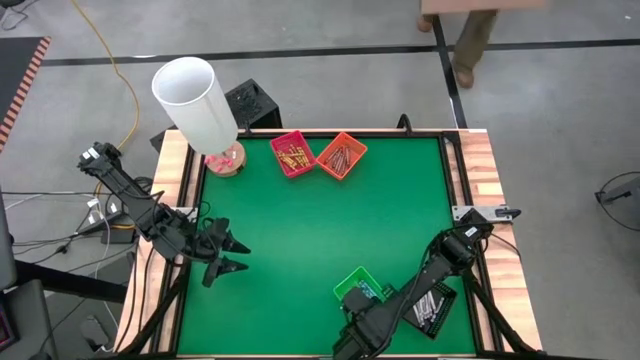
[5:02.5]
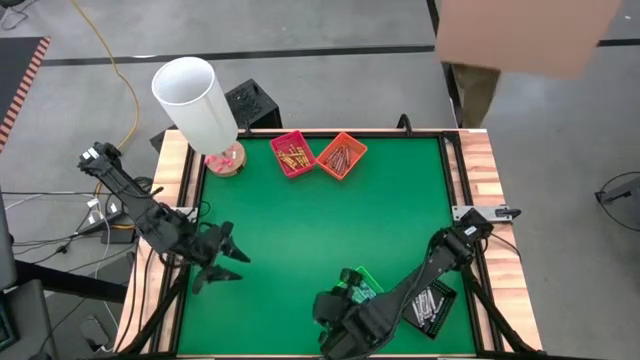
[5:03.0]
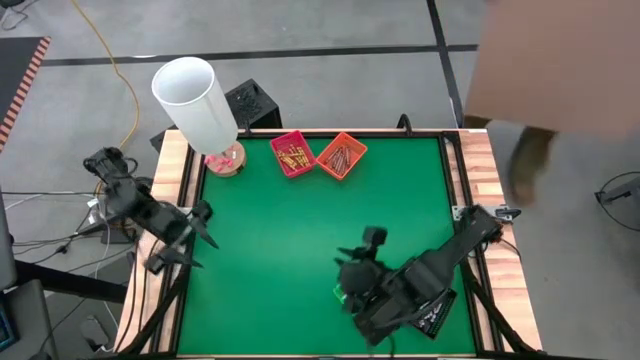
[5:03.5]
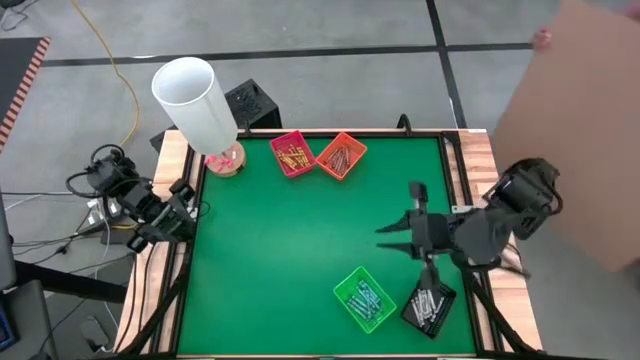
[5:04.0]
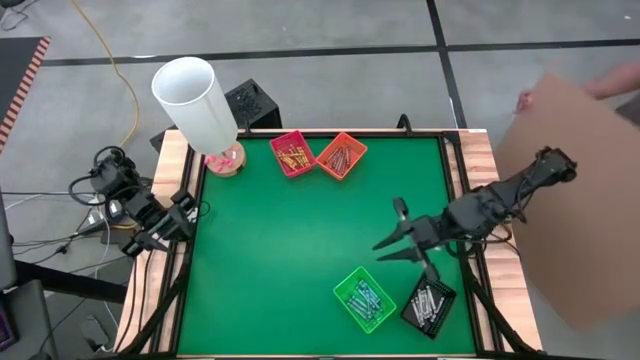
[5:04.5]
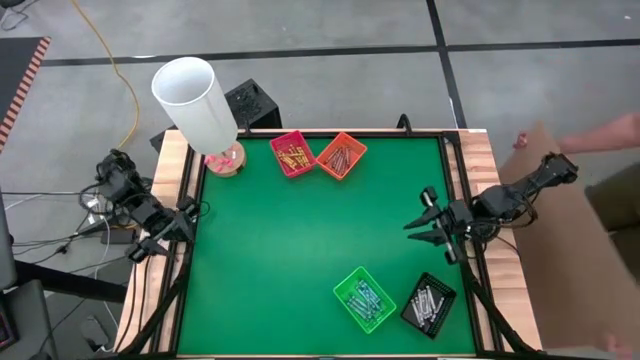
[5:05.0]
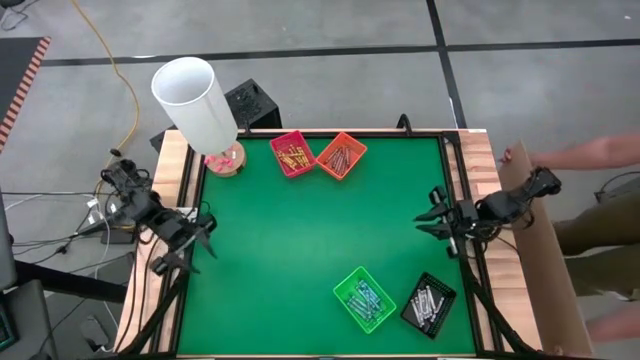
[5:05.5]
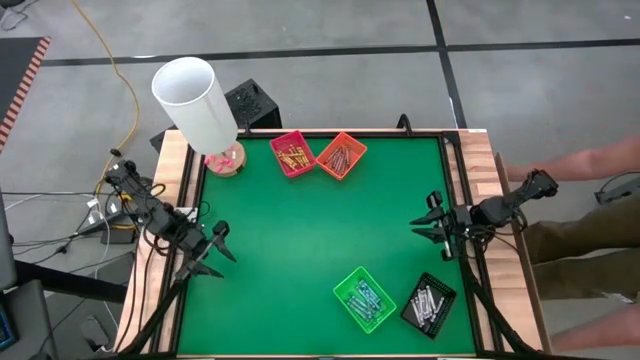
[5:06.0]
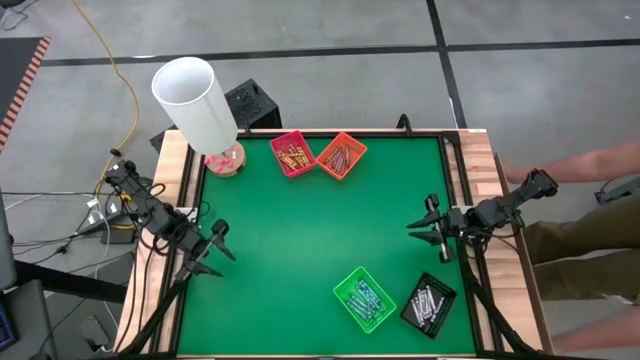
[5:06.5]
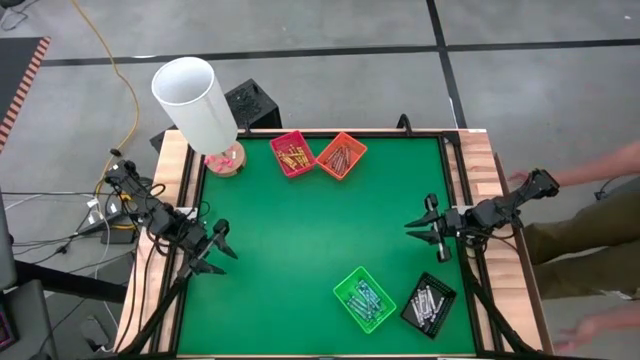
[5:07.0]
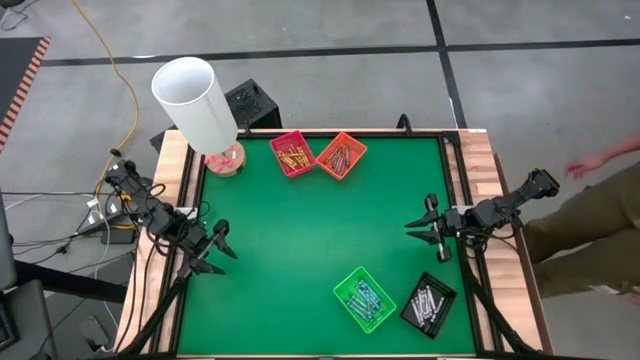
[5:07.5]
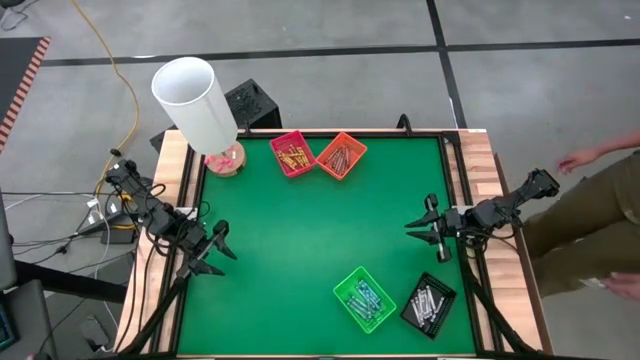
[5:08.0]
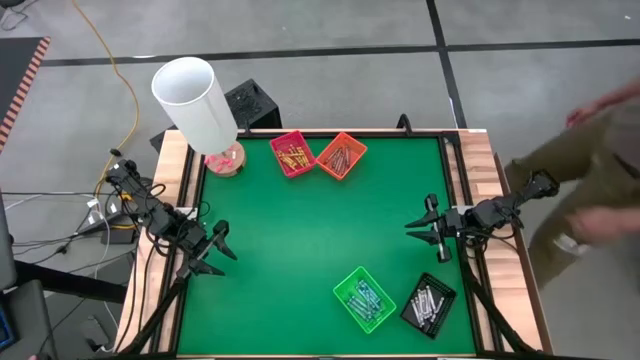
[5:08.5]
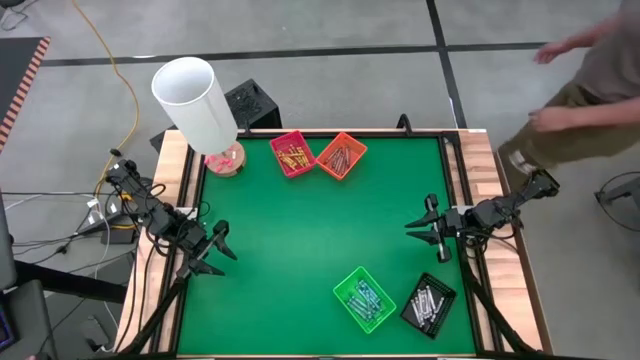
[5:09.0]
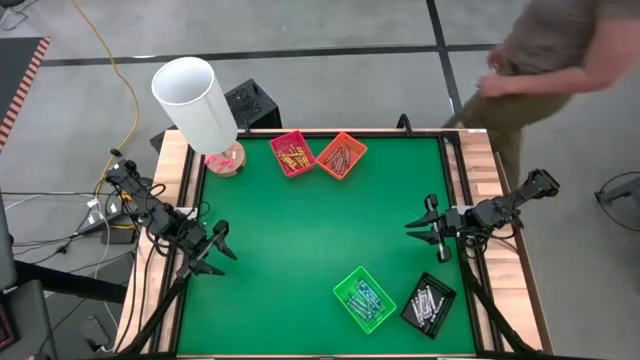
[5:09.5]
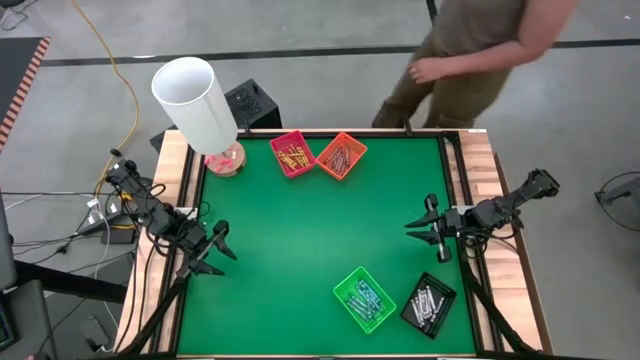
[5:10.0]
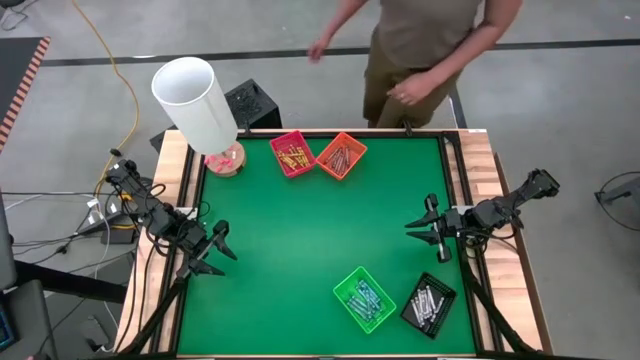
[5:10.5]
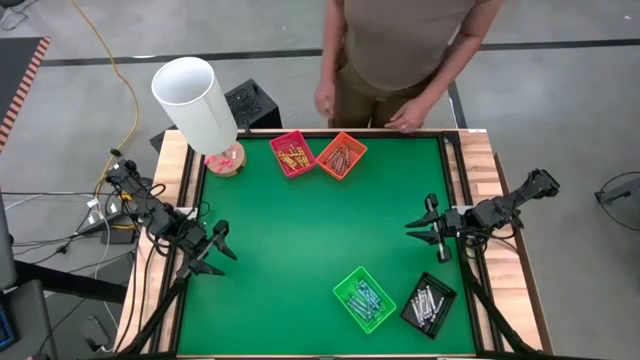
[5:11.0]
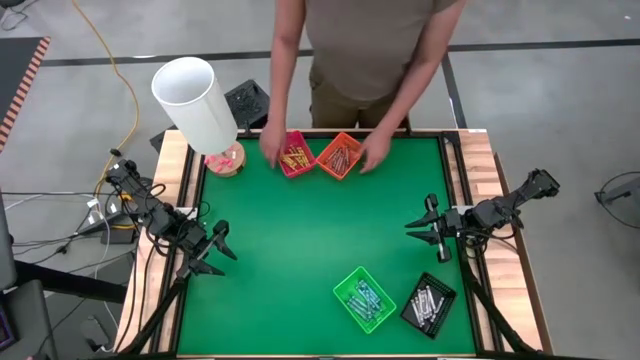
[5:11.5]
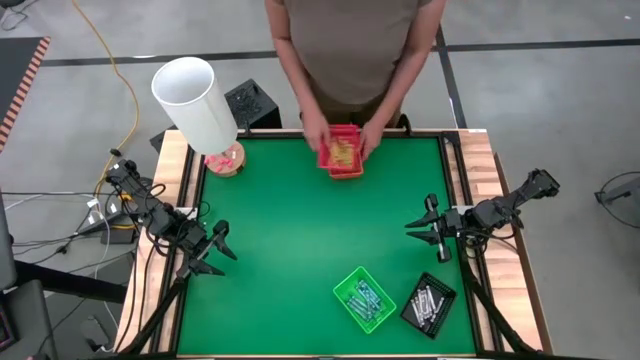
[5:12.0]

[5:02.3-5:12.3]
Task: Sort crayons
Return to Home Position

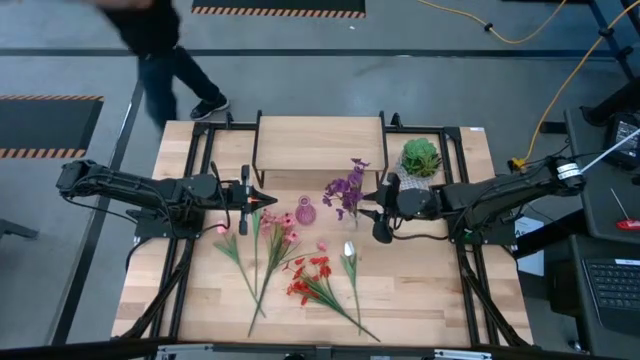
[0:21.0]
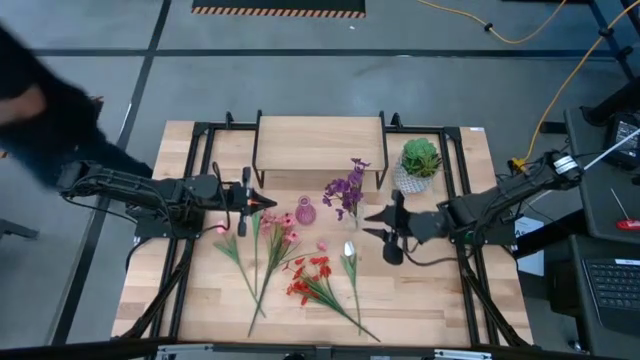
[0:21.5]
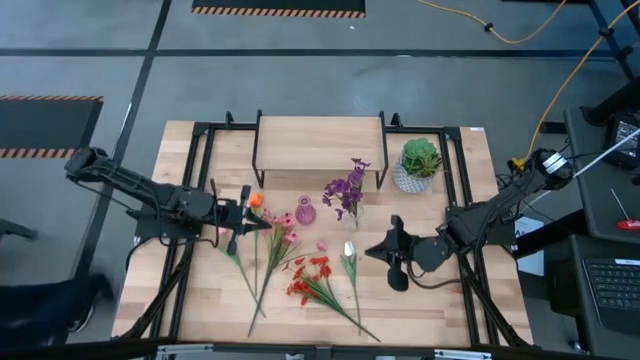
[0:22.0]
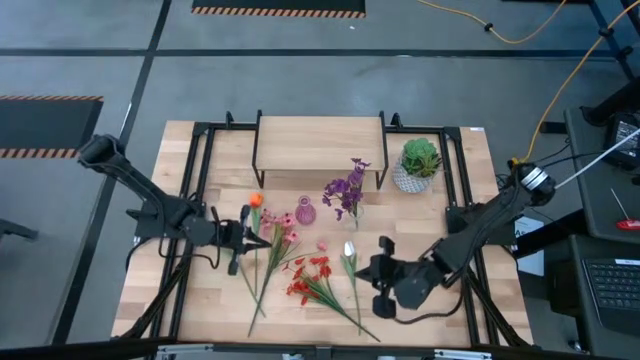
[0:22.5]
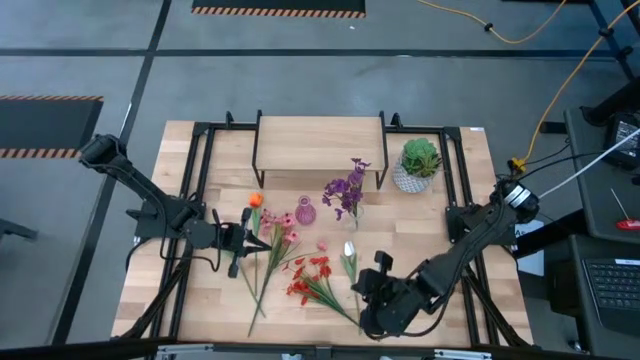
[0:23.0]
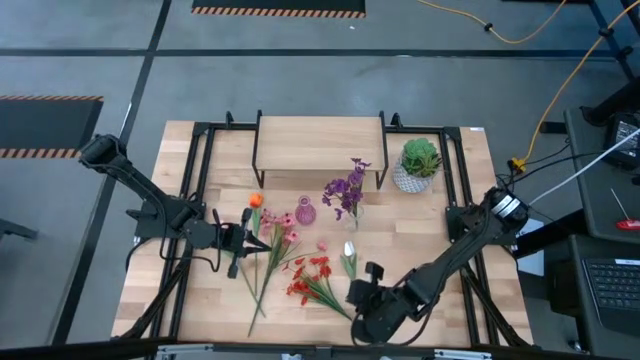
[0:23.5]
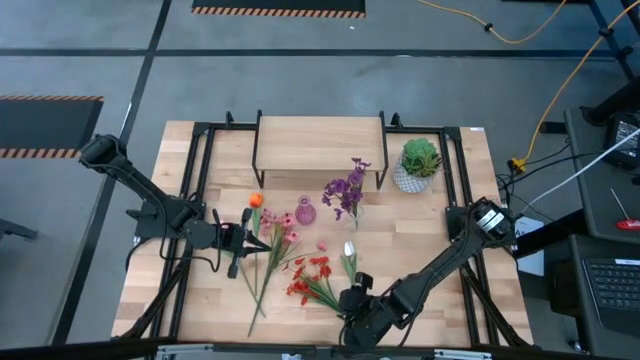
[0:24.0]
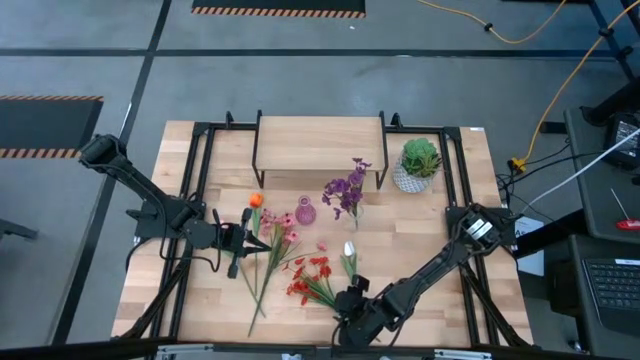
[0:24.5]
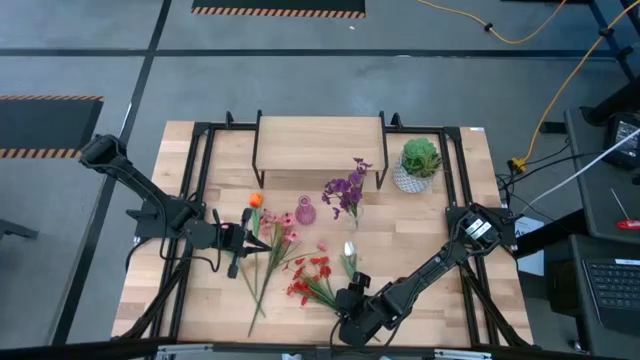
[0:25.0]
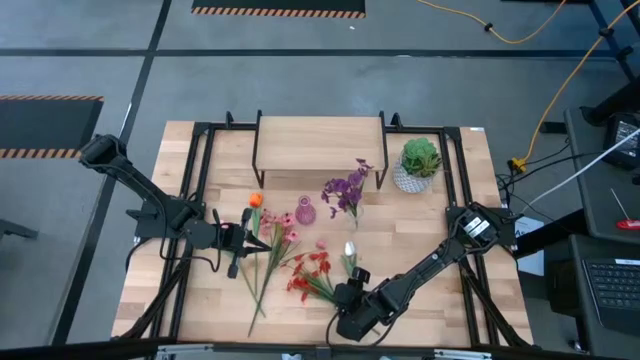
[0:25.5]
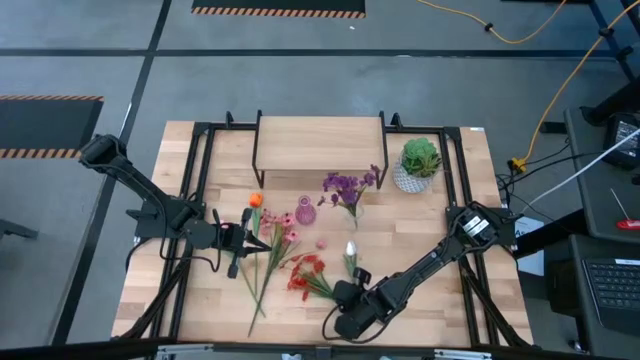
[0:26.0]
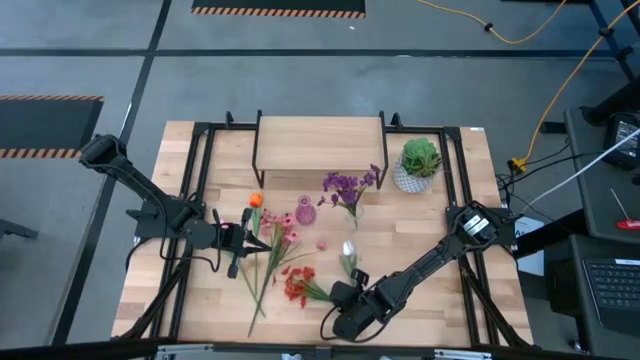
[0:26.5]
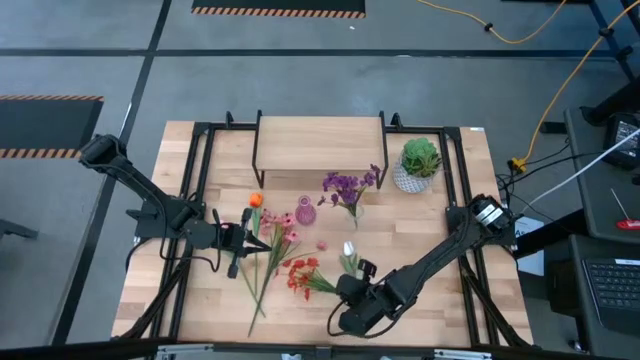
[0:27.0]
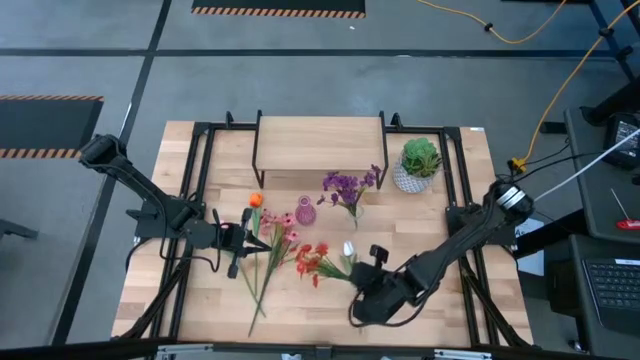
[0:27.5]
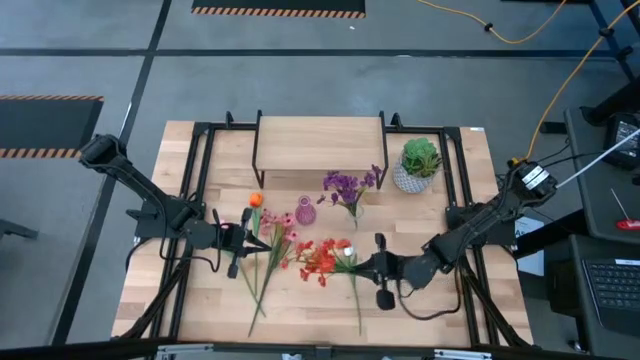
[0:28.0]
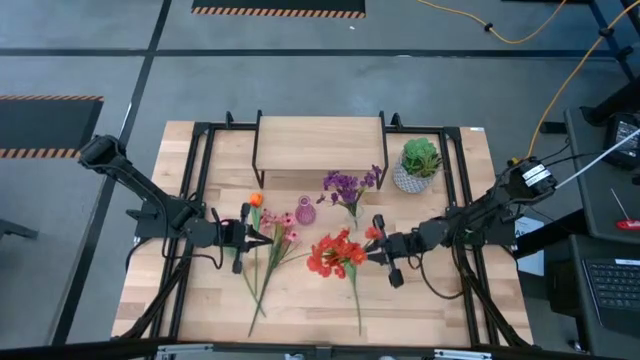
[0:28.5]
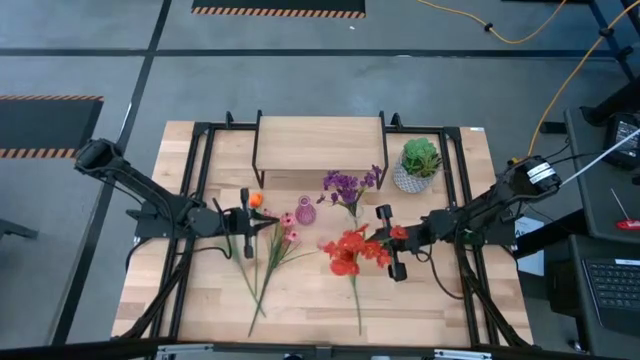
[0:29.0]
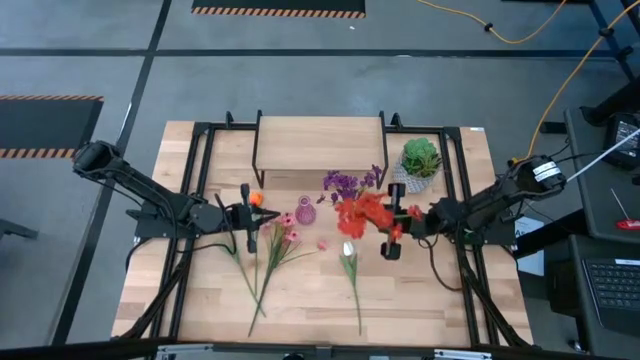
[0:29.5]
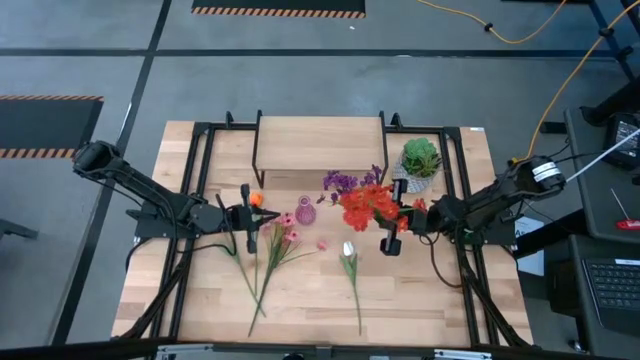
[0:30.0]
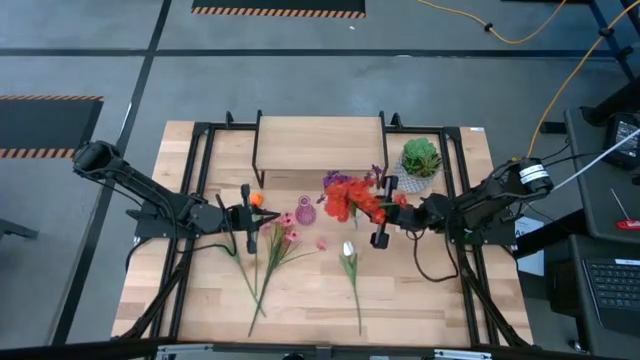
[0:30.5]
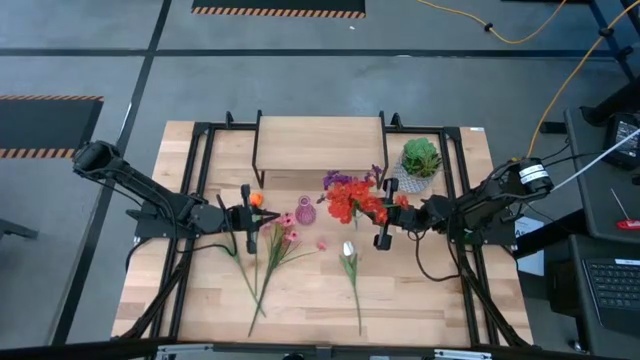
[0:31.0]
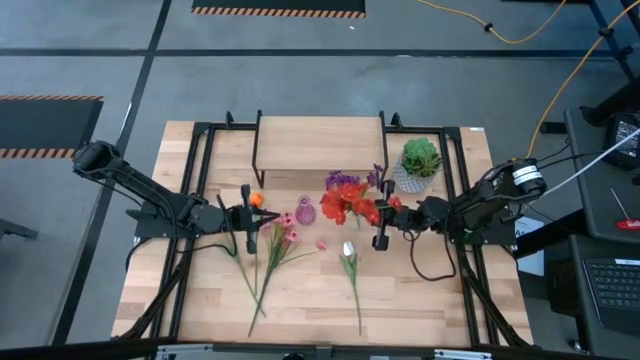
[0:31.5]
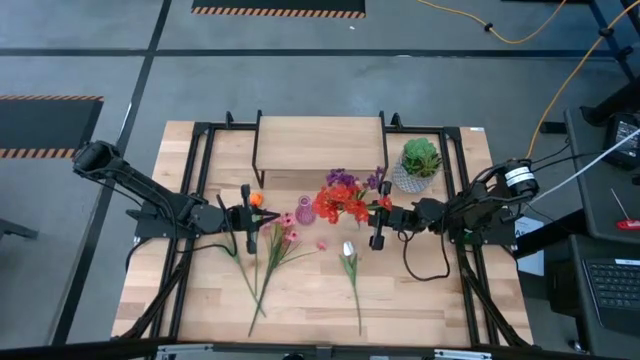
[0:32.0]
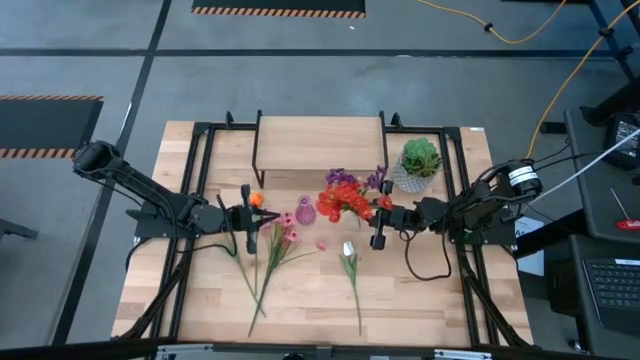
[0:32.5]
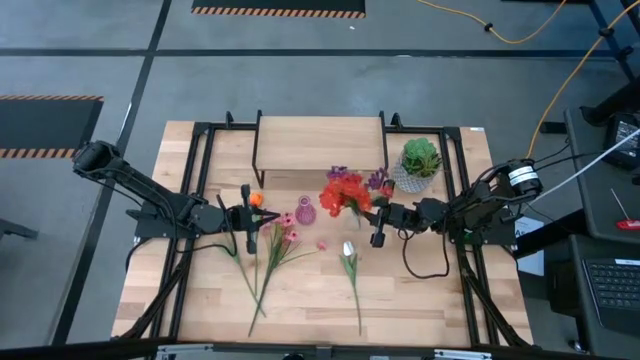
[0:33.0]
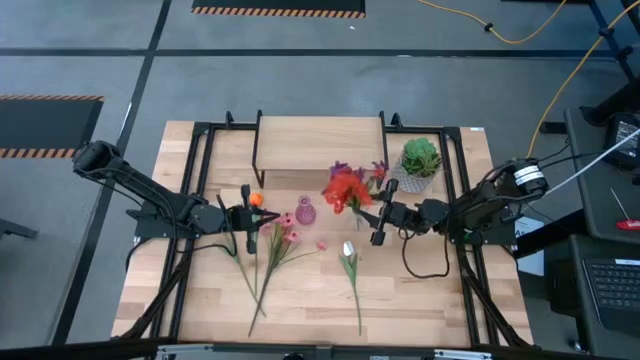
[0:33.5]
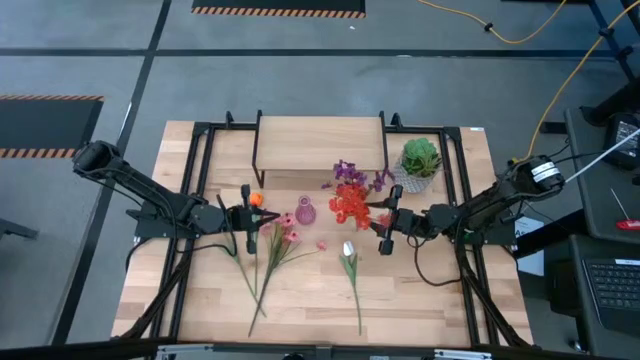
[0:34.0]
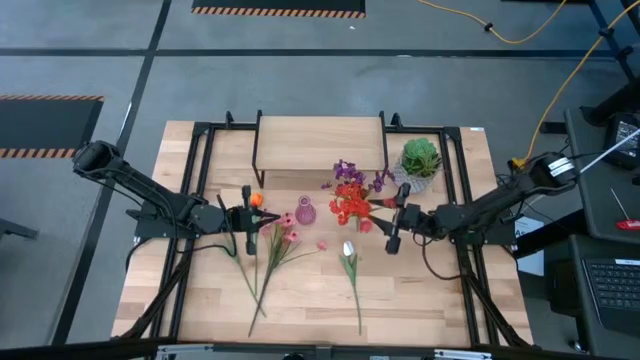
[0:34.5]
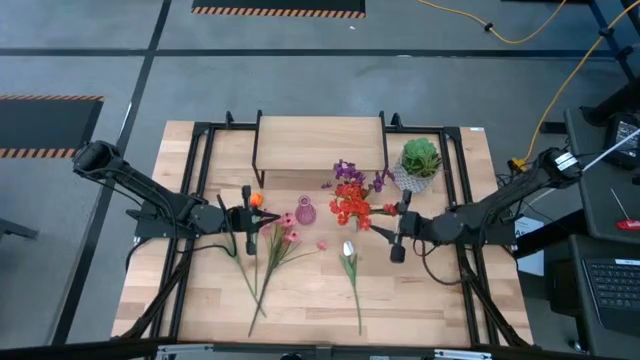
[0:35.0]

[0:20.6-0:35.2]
Task: Pick and place flowers into a vace then onto a shelf
Put the red flowers into the transparent vase
